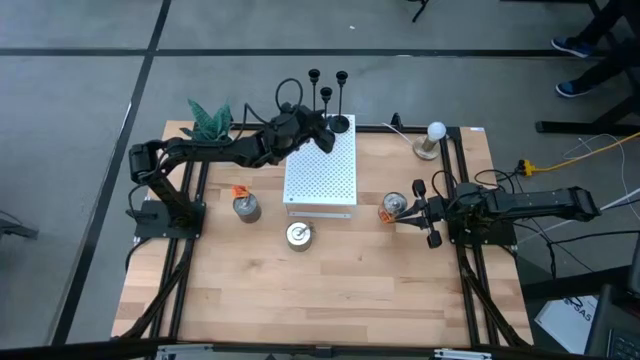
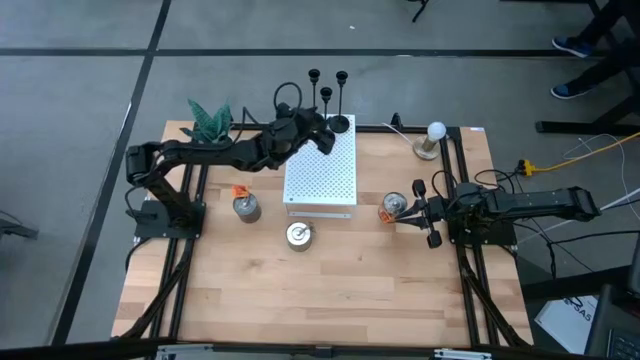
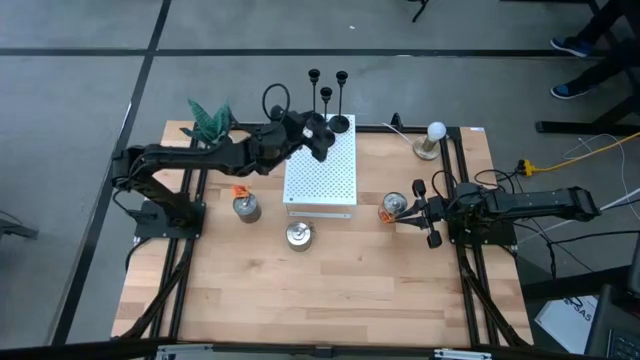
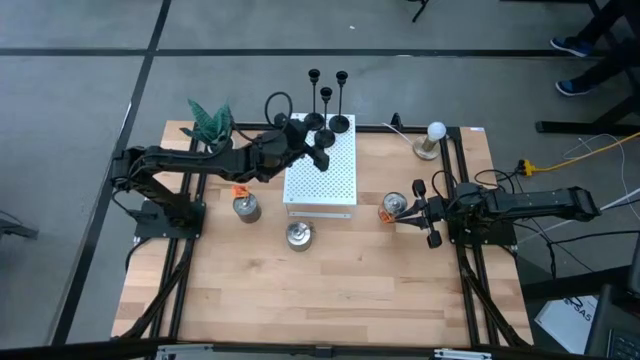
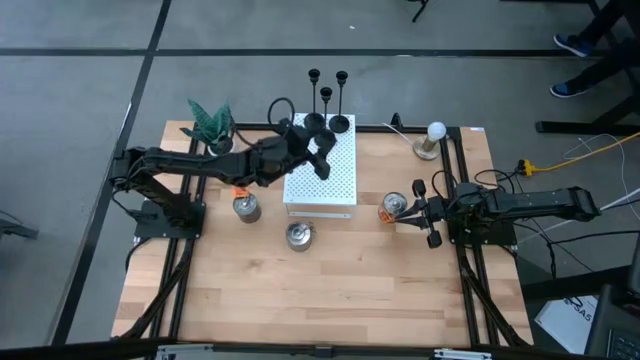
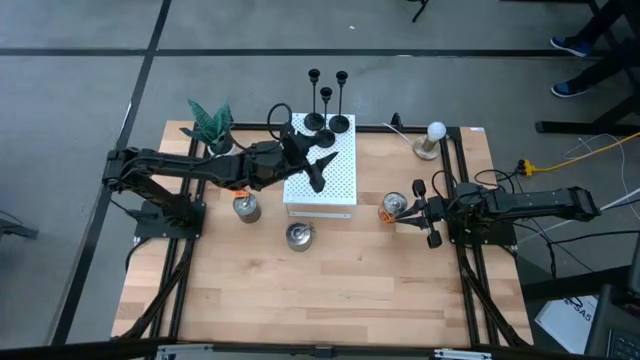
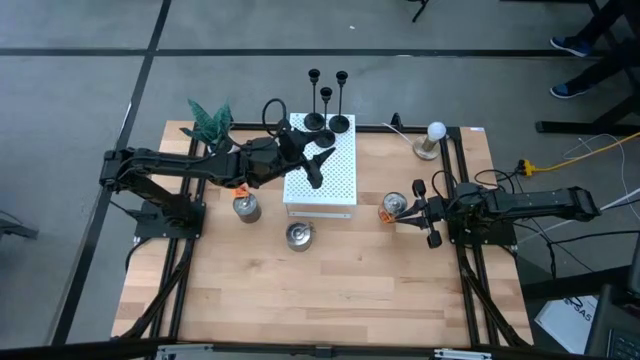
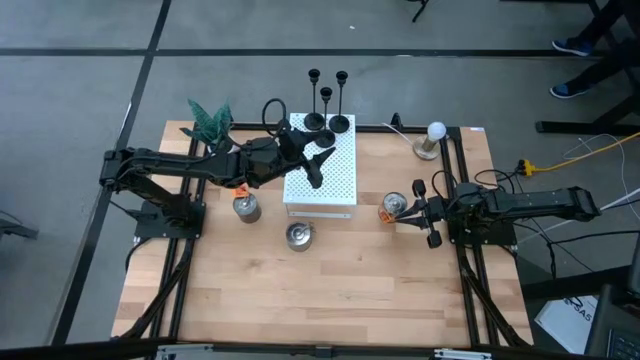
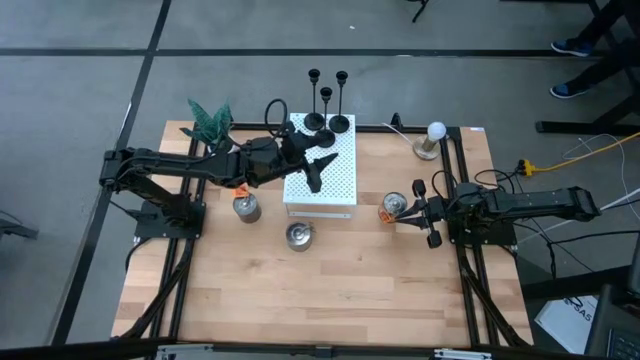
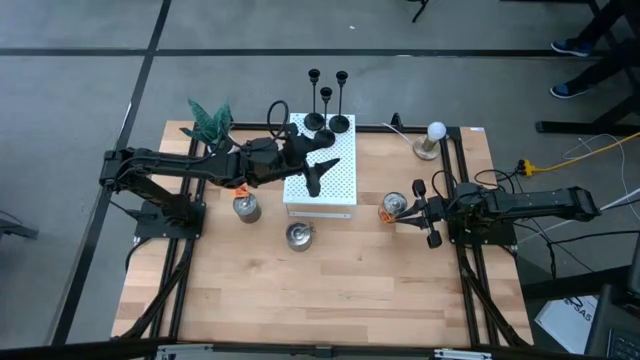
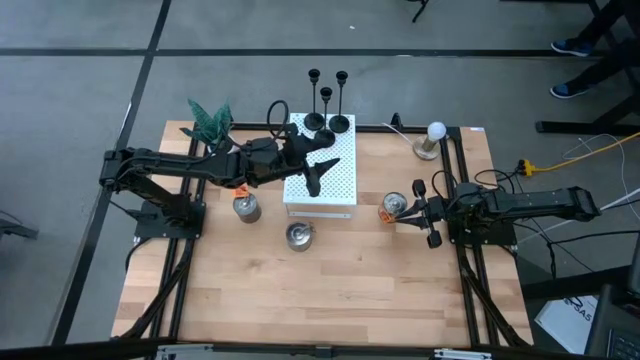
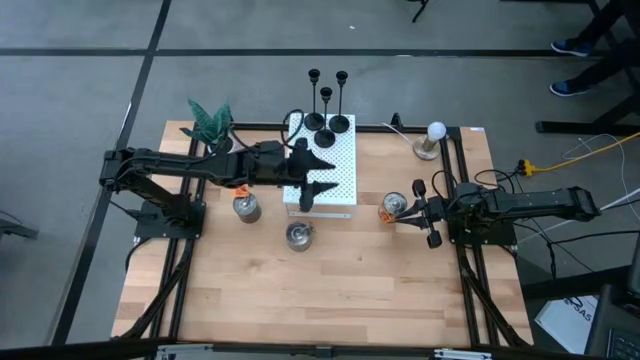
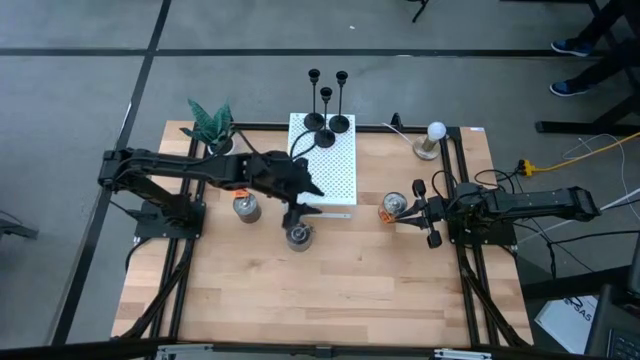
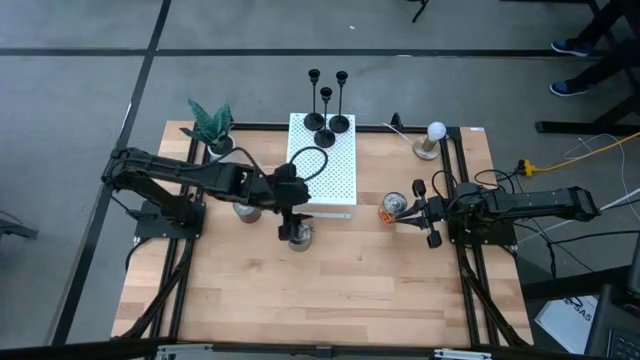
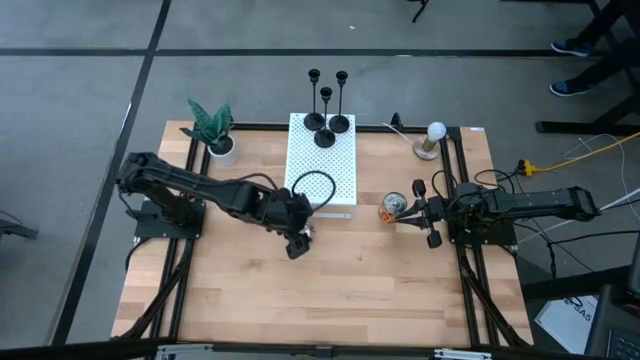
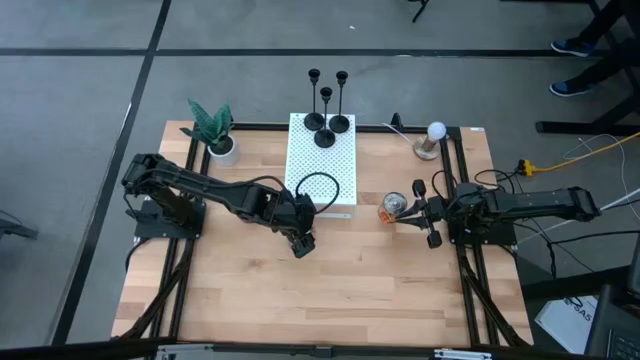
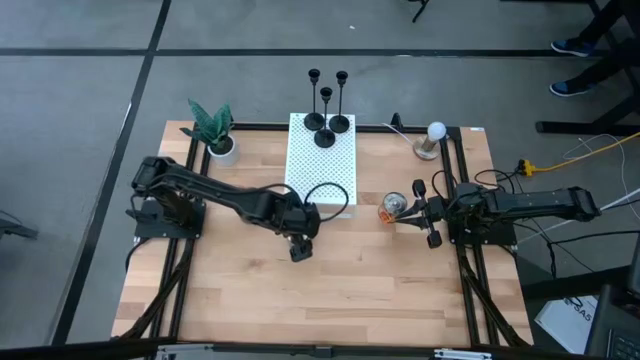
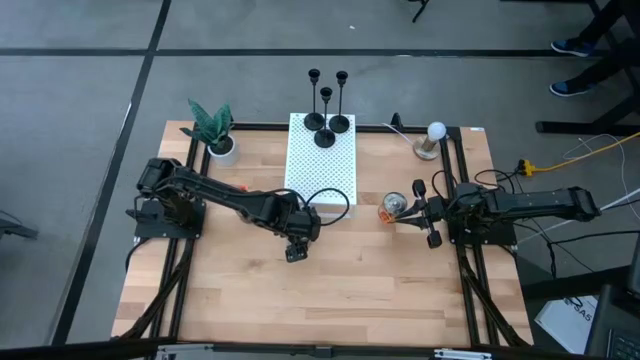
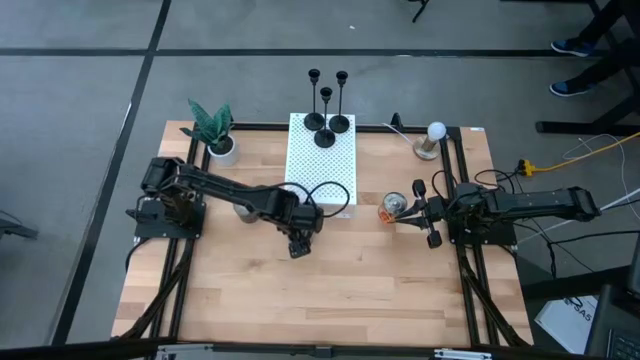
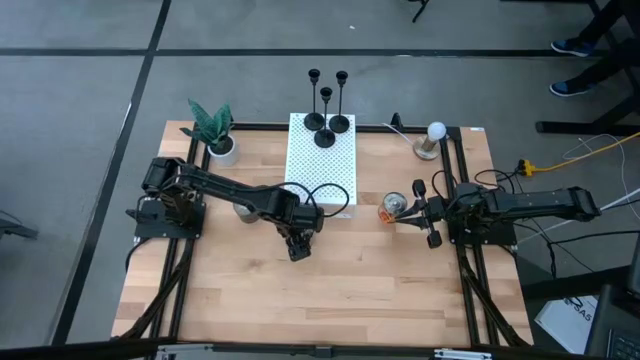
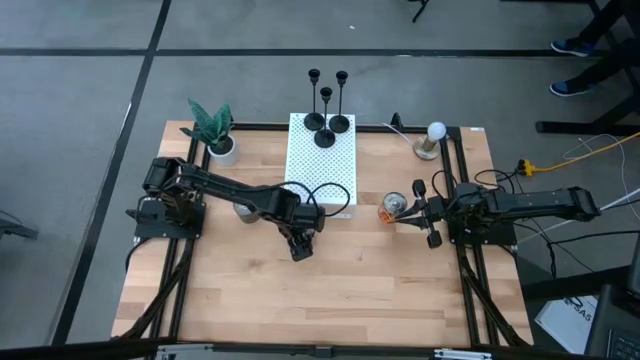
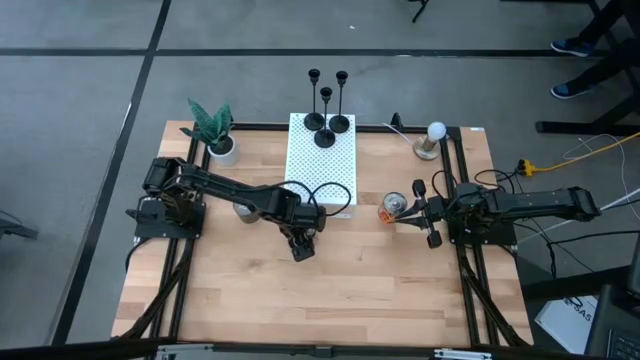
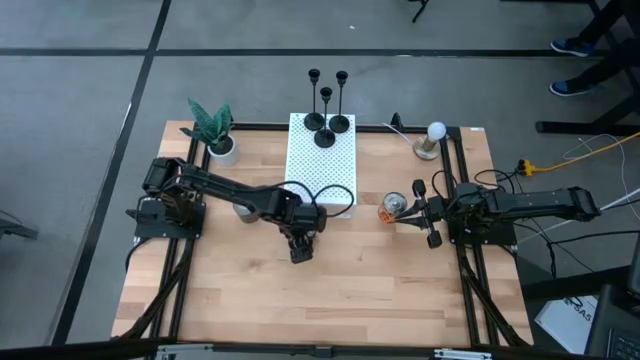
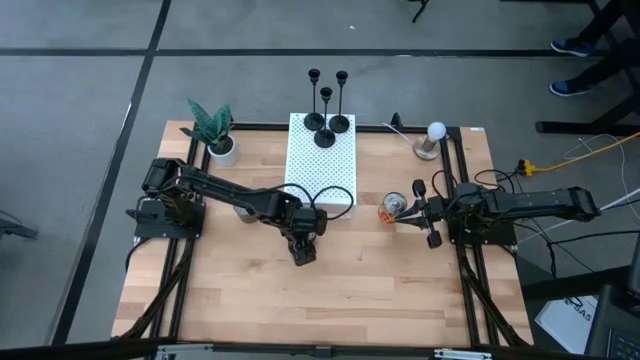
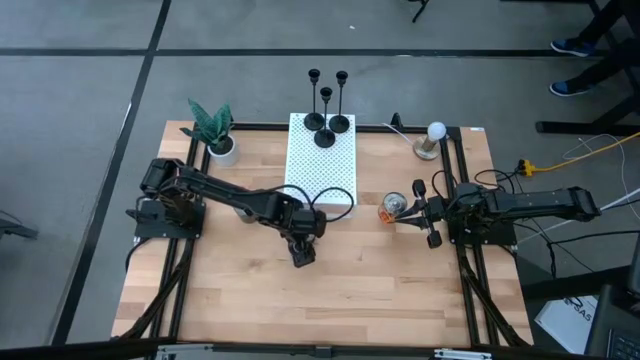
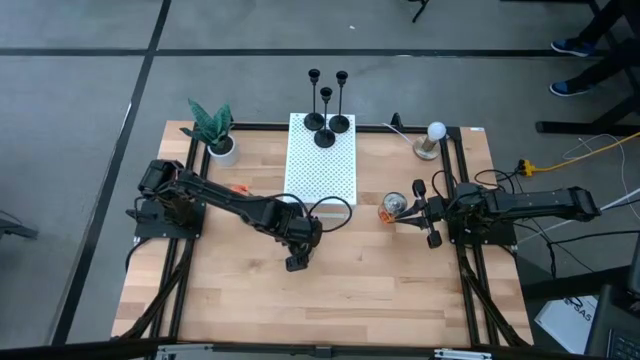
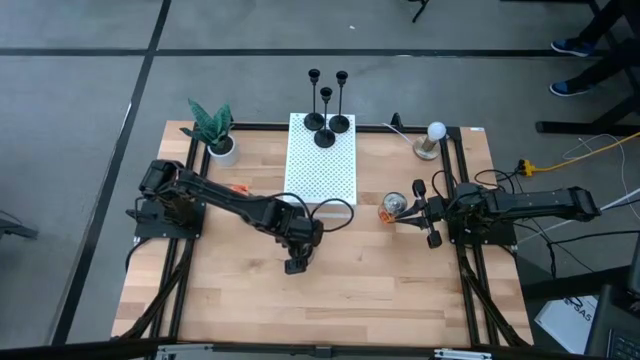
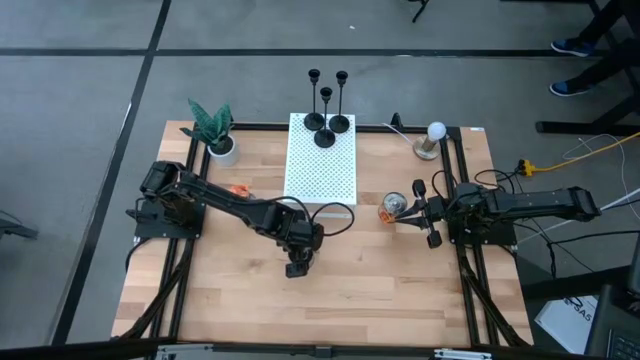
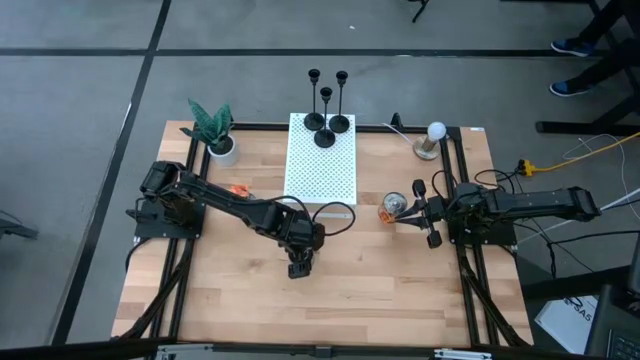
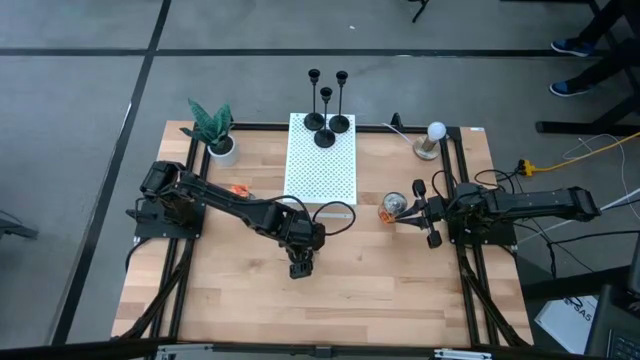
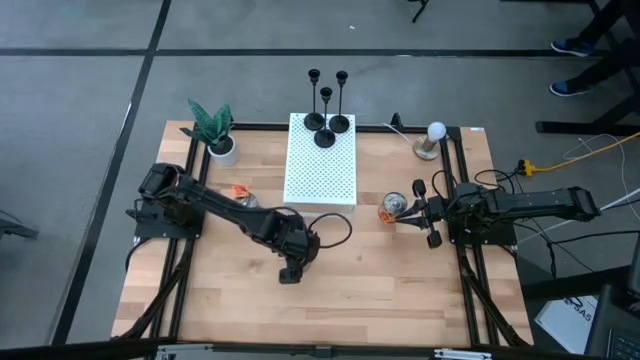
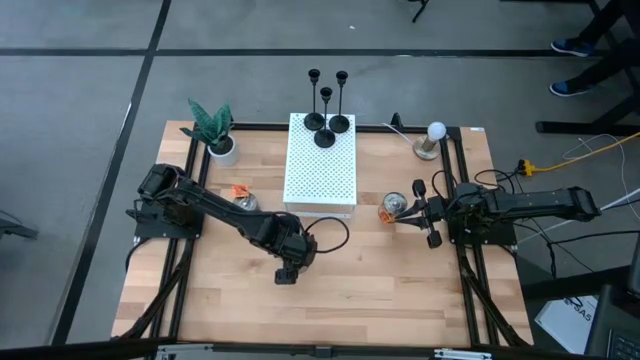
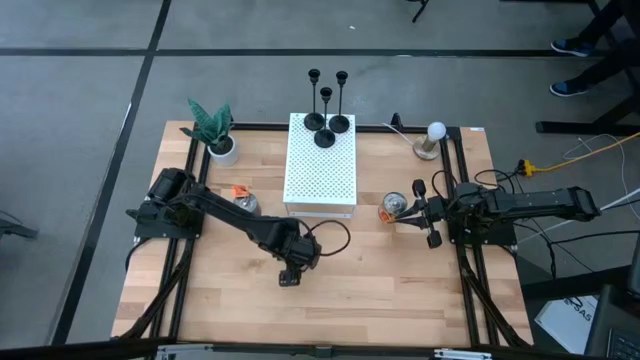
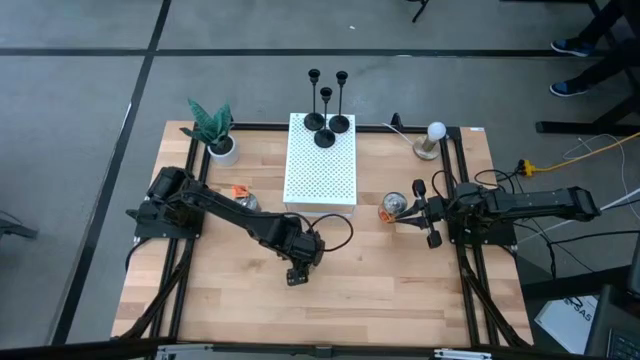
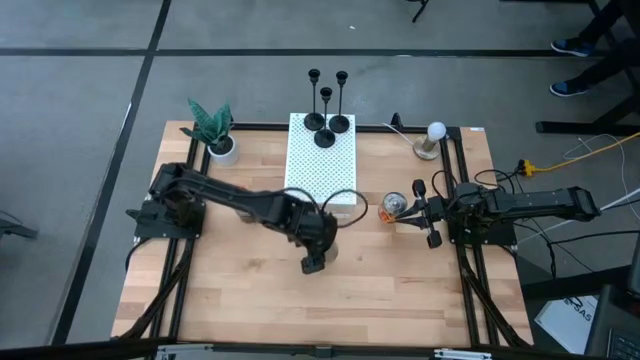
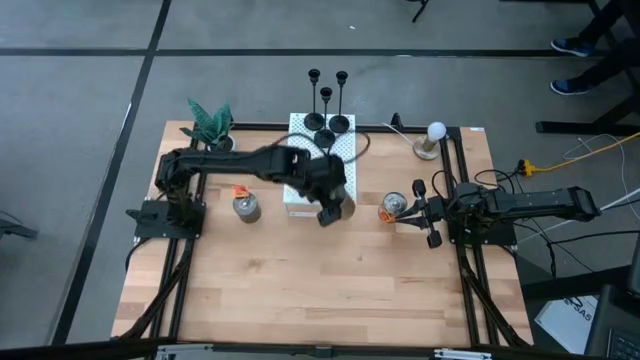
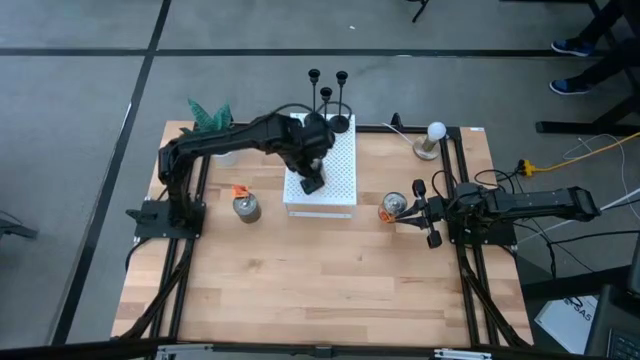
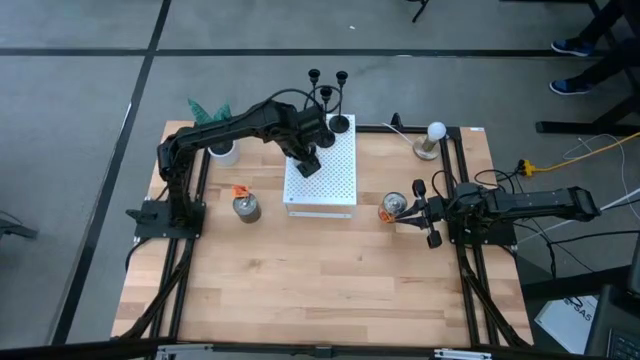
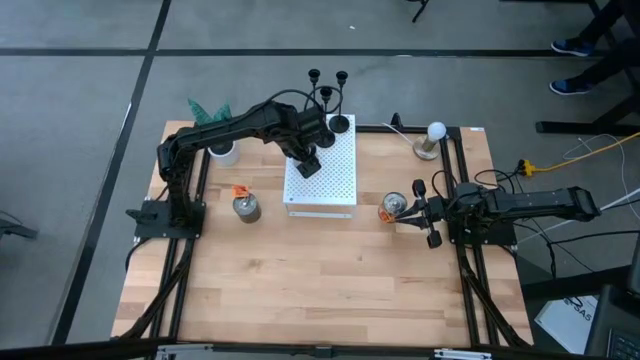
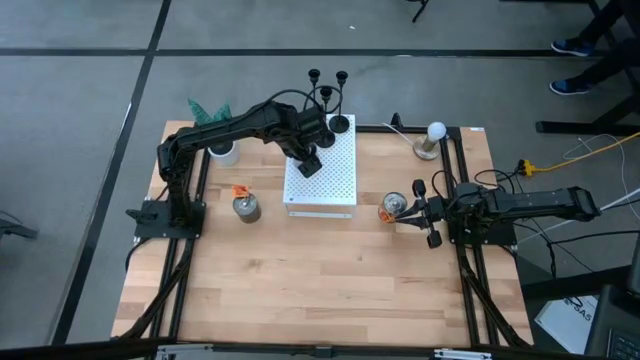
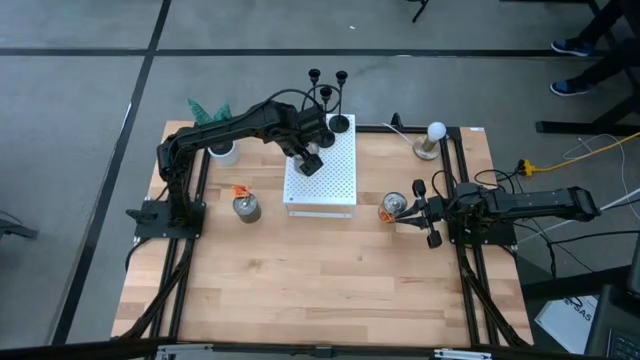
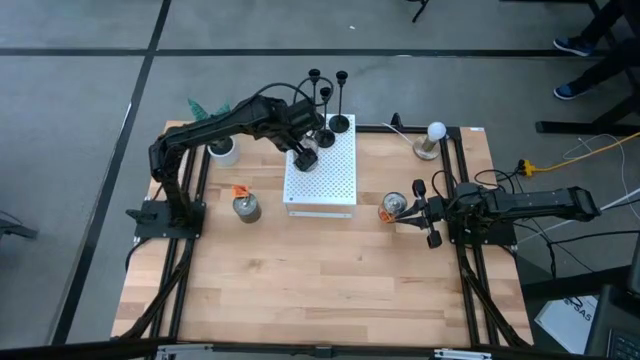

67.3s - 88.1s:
Task: Pick & Place candle stick holders
Put the brown scented candle on the shelf

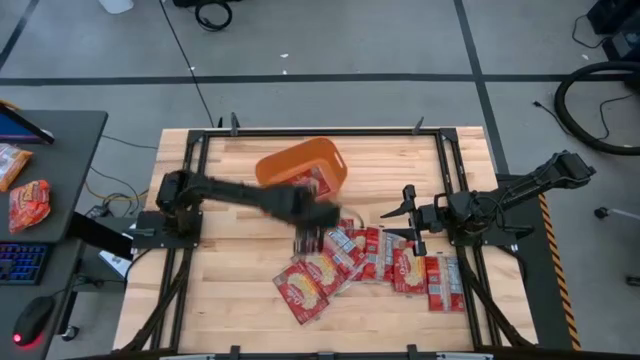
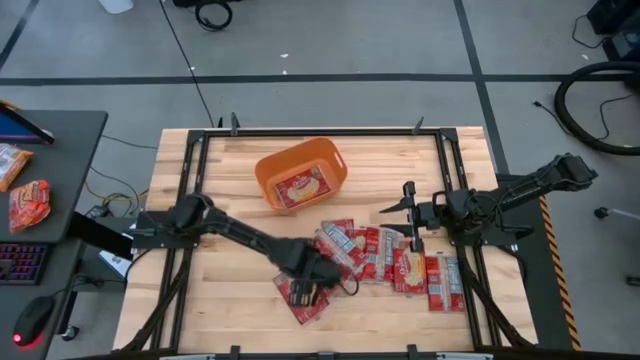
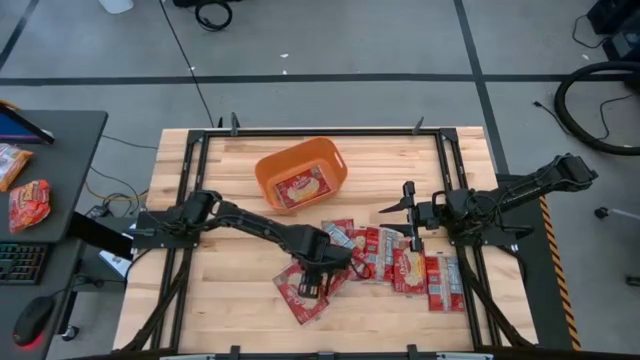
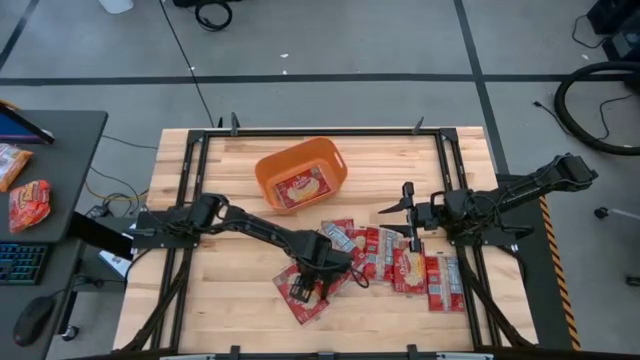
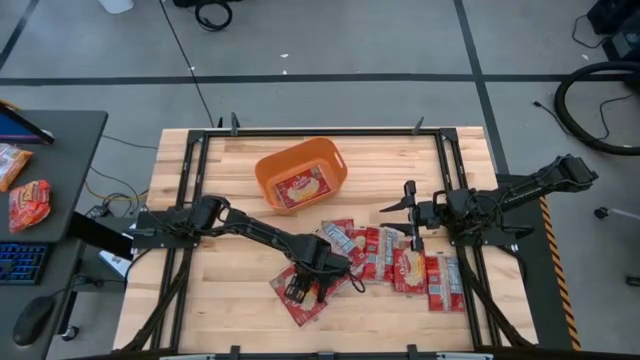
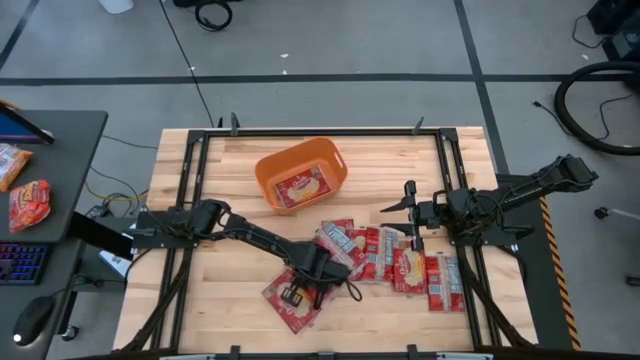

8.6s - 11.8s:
Task: Sort popcorn bags into baskets
Put the popcorn bag into the orange bin
